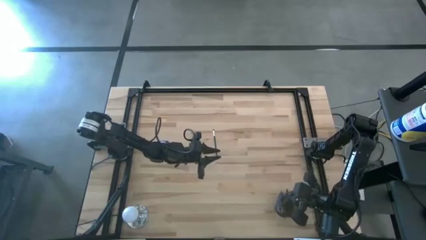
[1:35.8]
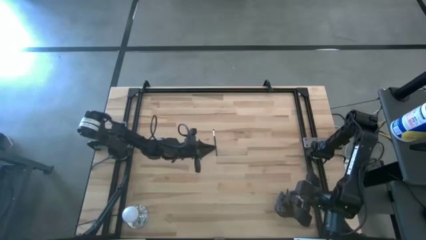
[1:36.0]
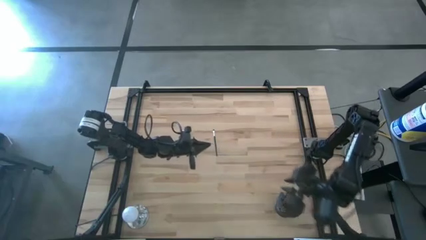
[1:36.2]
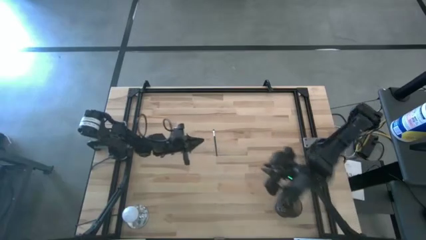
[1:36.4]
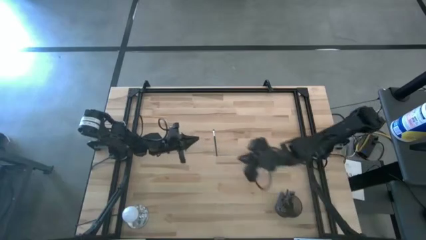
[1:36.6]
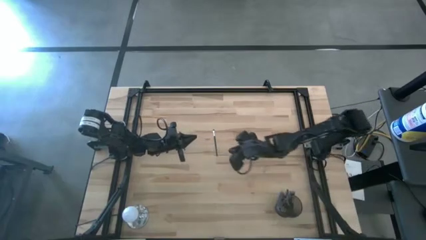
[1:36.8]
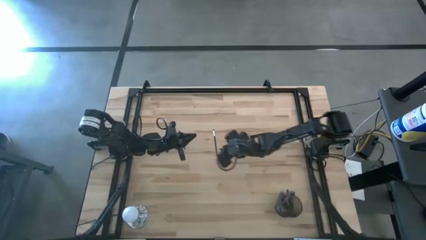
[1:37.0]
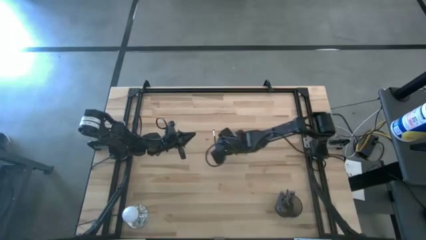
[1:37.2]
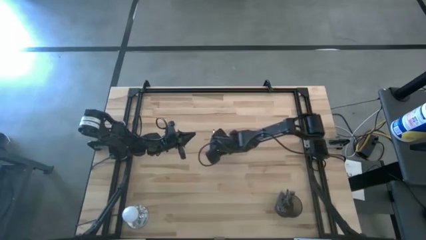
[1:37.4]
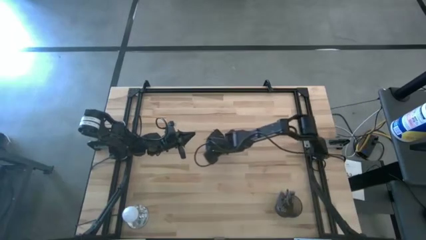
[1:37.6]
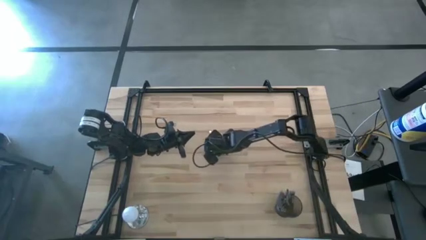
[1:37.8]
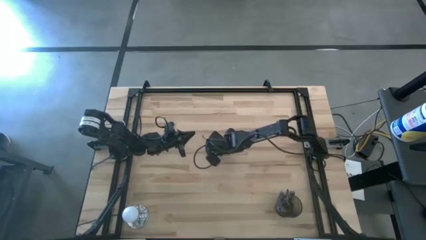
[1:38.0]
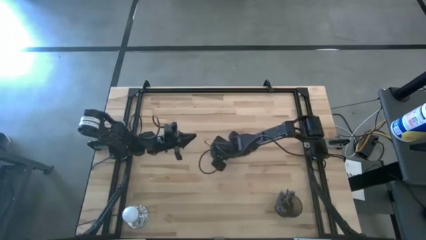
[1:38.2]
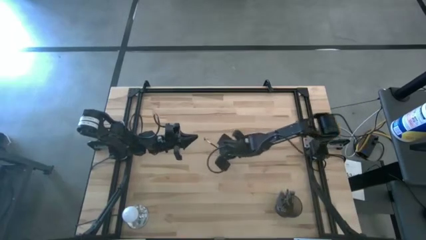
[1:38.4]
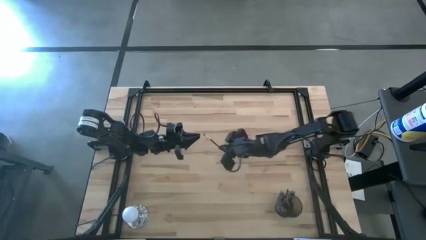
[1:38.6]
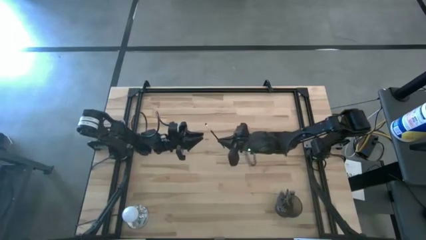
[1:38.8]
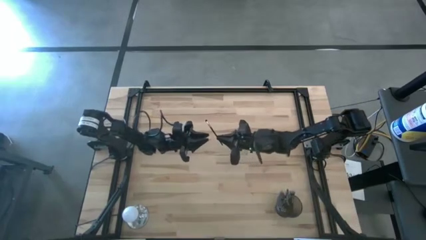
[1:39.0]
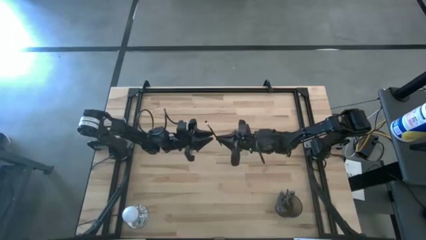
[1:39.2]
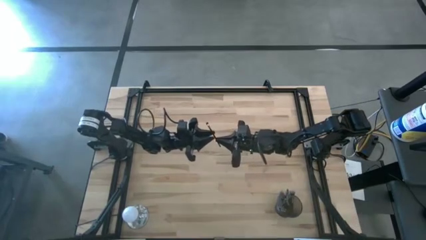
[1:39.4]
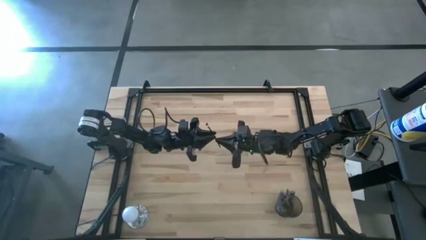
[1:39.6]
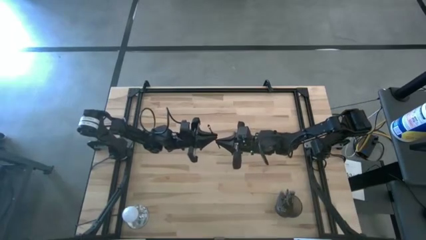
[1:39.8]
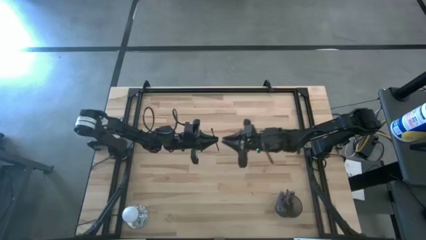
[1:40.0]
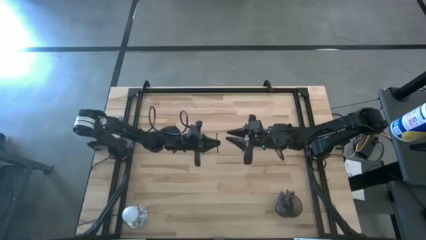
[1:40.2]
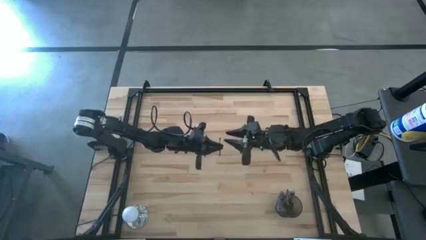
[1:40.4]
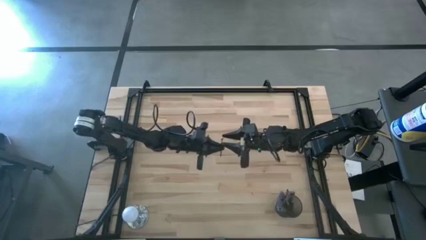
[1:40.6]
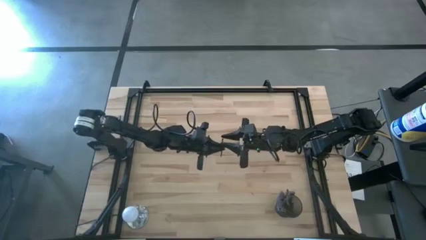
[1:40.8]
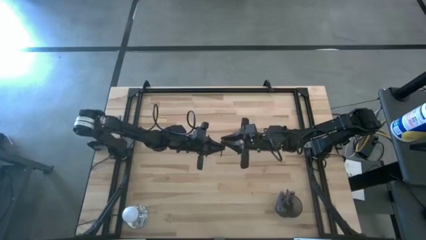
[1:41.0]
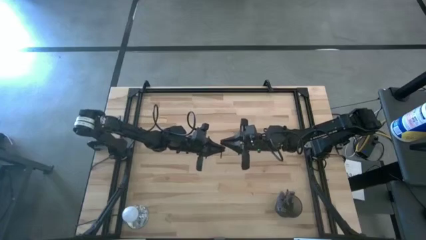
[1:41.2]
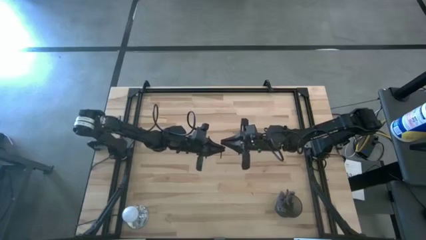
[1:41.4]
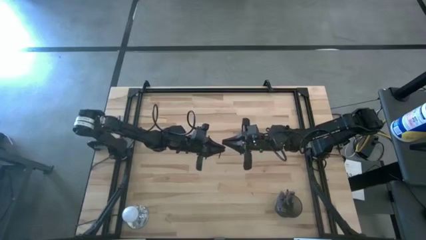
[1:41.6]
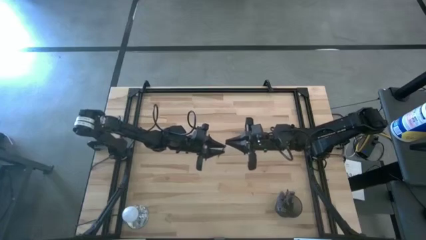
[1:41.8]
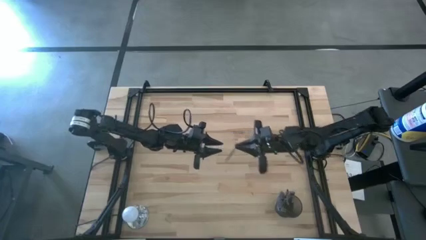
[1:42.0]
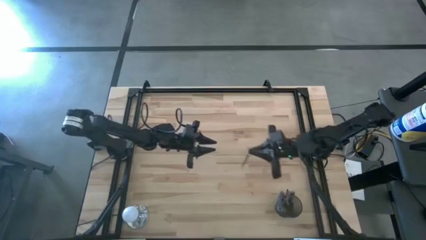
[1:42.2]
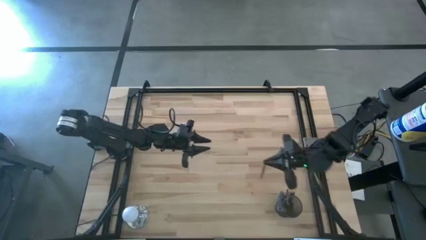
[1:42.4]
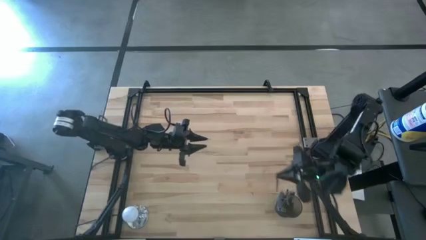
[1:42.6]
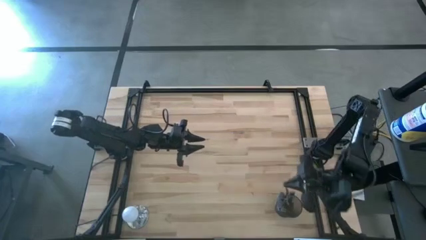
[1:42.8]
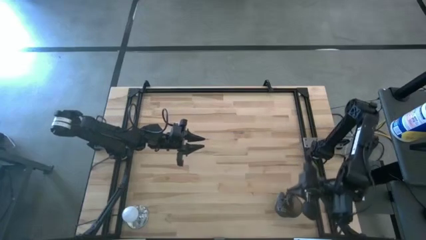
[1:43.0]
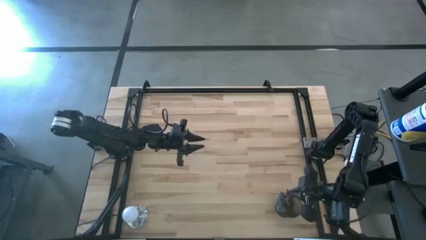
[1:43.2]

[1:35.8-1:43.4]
Task: Sort items
Put the lip brush into the wire basket

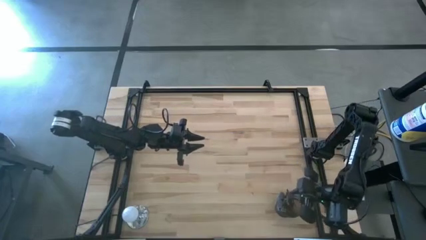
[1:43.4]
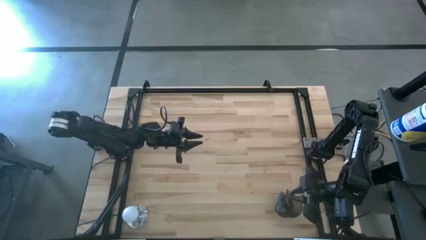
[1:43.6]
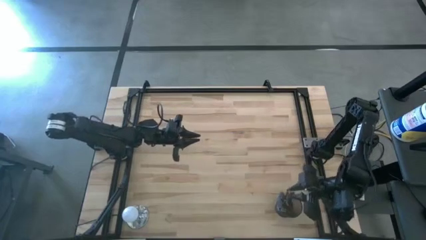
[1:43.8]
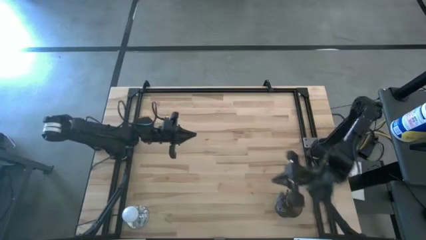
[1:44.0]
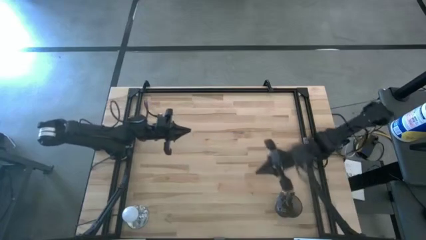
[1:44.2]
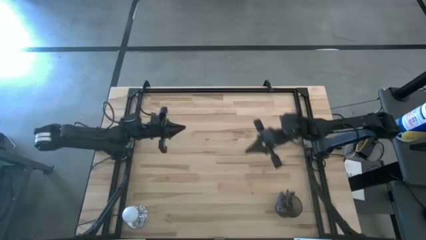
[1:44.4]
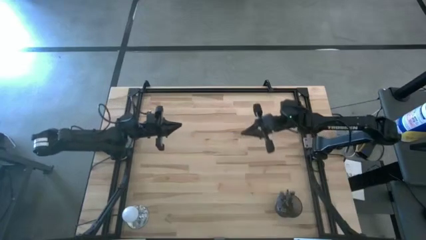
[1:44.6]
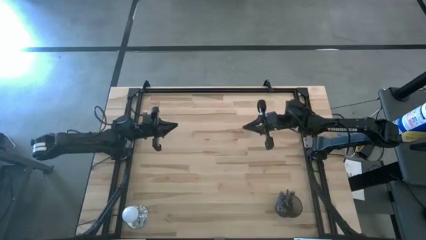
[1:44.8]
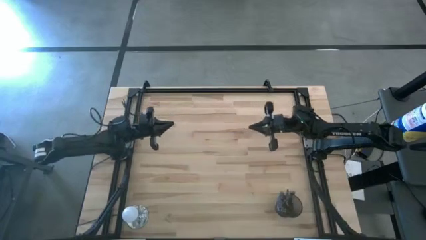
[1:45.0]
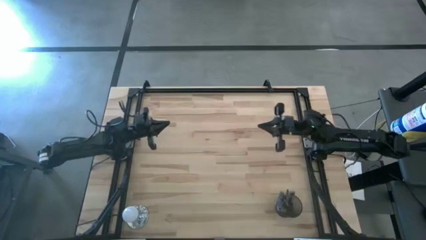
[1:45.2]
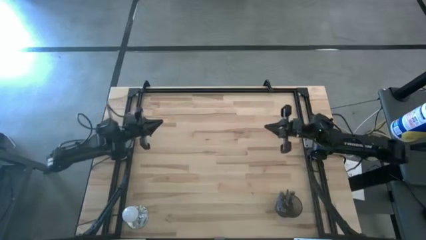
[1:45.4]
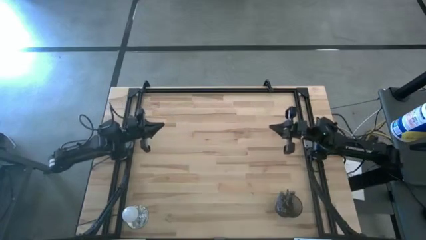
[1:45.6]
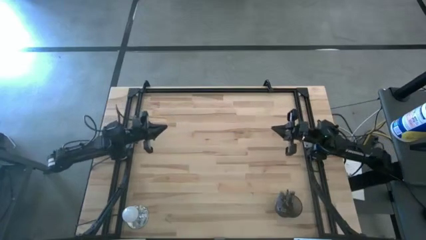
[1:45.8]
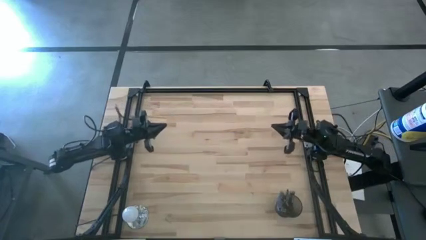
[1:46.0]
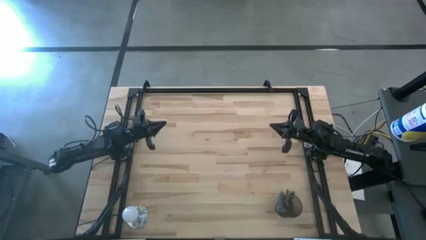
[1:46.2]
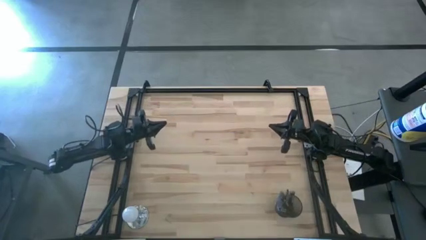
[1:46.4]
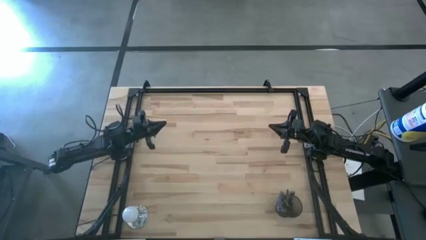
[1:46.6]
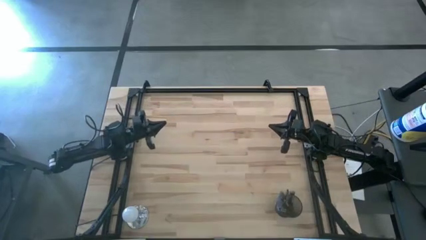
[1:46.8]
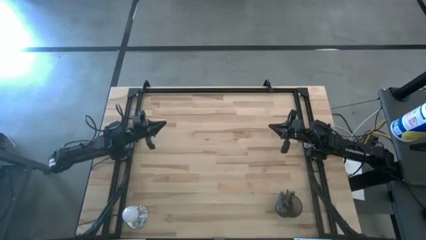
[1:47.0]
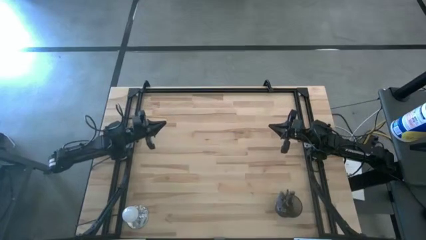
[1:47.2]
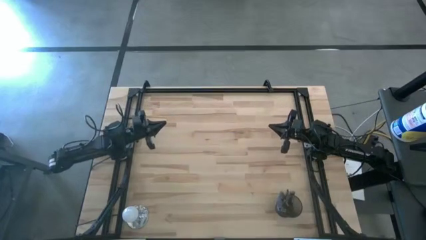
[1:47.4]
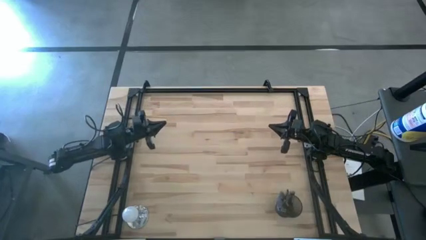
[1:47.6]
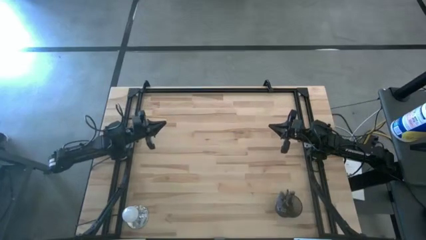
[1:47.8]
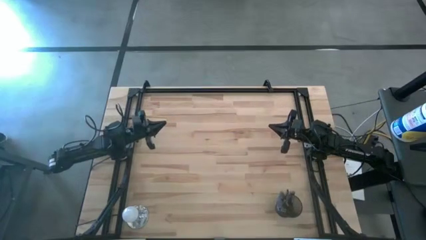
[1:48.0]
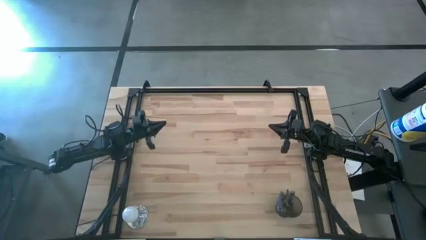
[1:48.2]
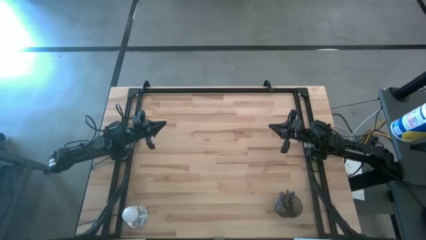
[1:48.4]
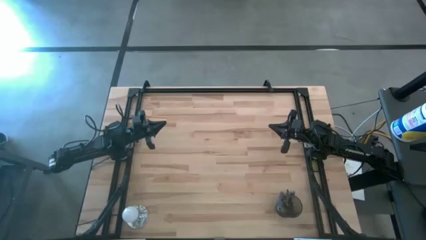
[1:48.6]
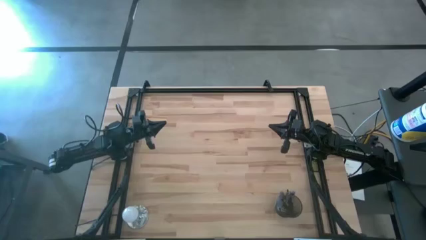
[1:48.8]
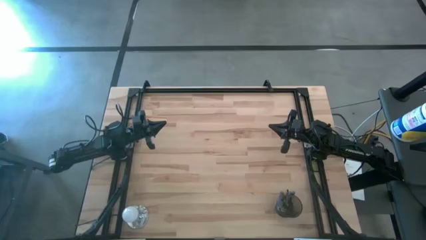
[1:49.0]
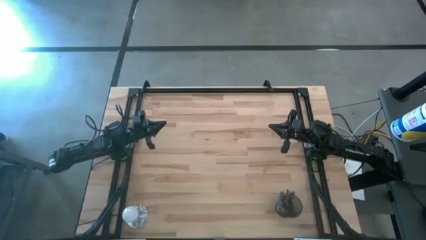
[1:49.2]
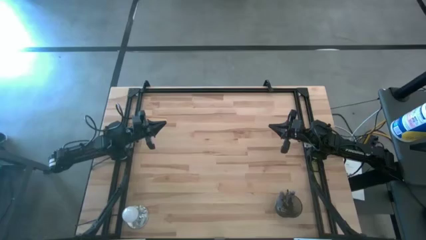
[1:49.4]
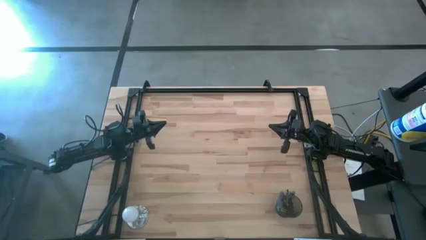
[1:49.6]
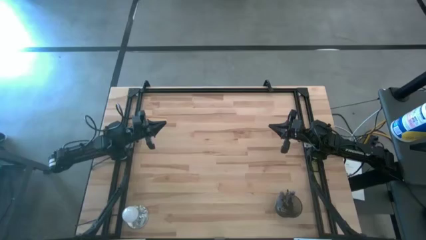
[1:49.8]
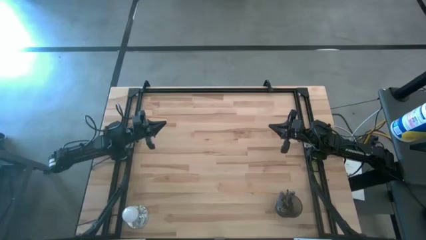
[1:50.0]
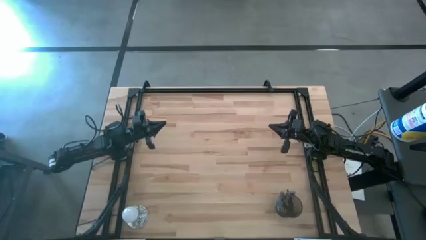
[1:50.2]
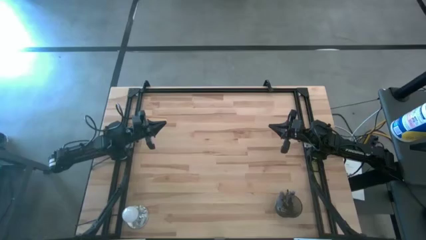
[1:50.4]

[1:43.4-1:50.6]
Return to Home Position

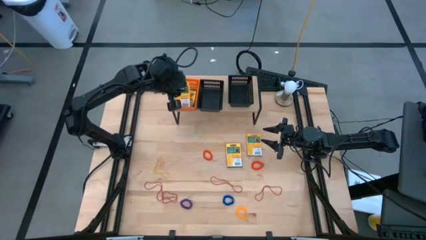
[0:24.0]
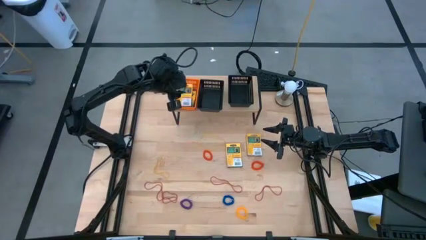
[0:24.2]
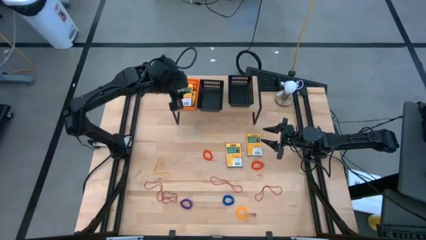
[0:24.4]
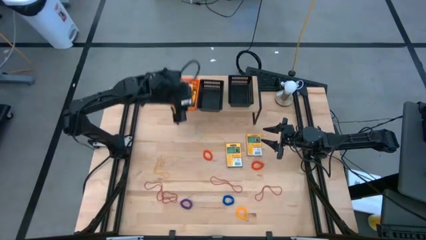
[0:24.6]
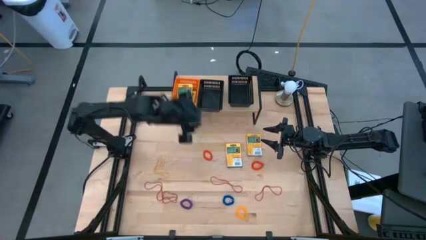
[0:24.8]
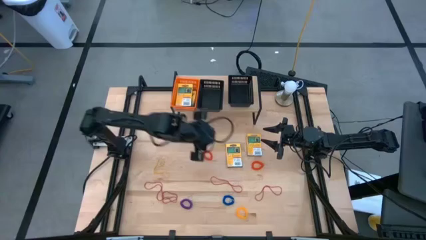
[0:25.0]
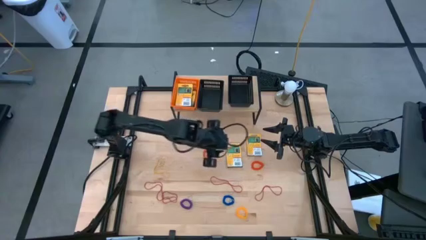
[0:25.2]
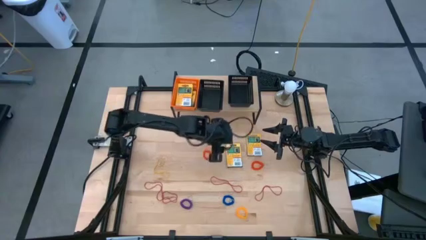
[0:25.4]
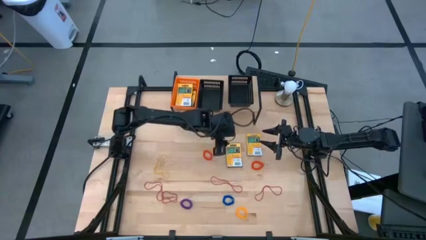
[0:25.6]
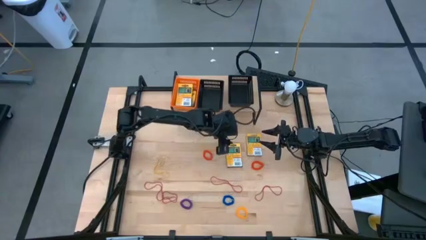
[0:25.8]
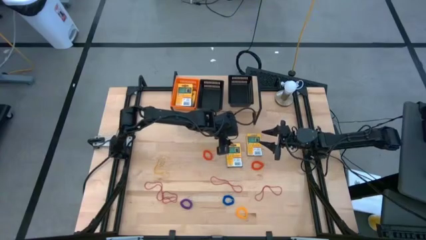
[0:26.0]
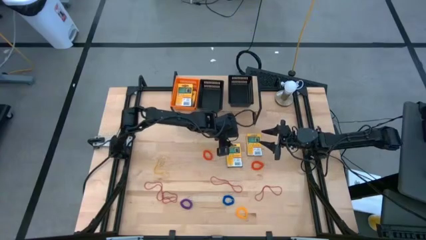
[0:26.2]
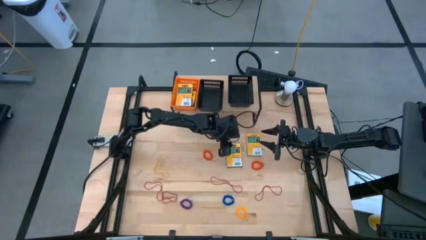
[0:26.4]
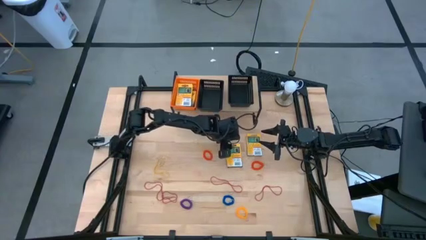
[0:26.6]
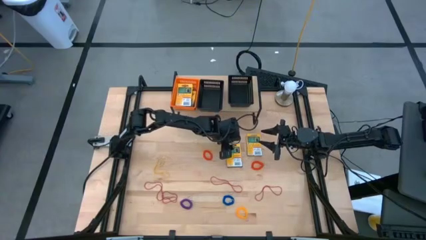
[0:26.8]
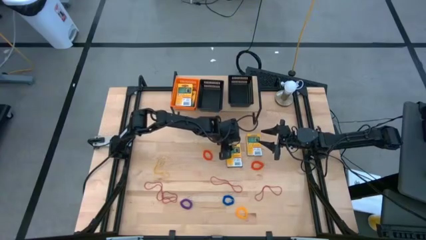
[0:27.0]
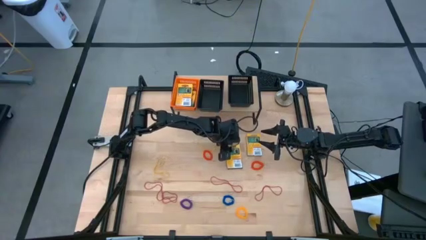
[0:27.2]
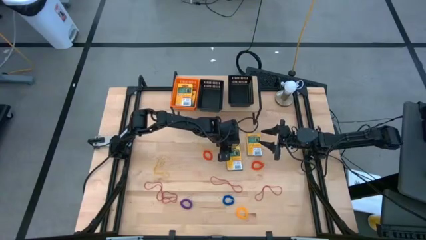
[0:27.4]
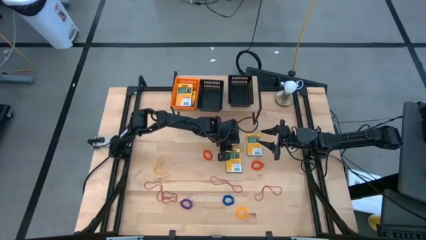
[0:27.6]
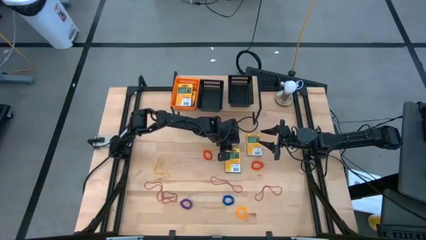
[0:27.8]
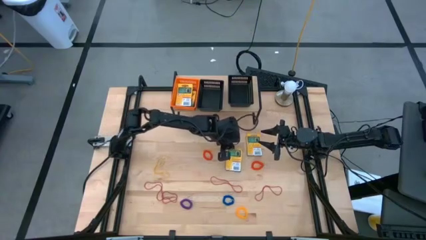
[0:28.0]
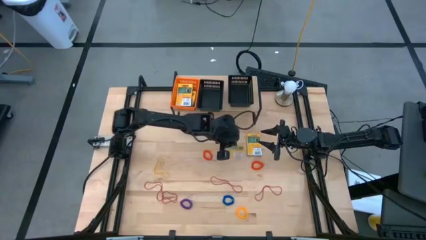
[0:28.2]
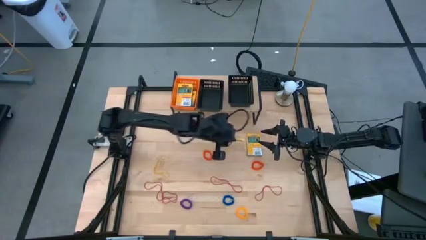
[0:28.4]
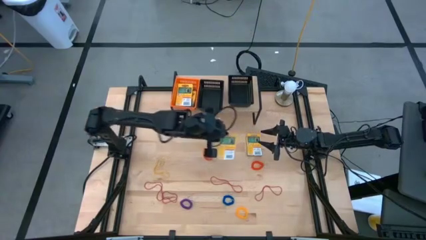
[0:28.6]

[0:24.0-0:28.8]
Task: Pick & Place Office Desk Supplies
Put the yellow pack of crayons into the orange bin on the shelf
